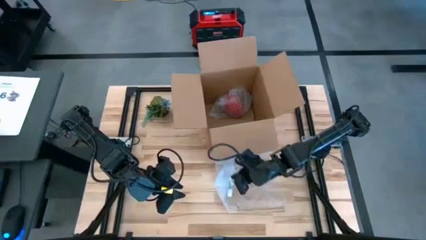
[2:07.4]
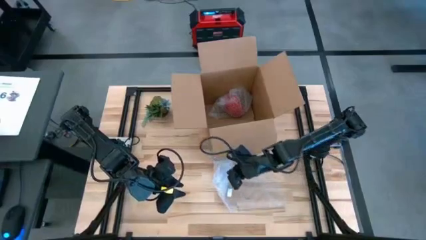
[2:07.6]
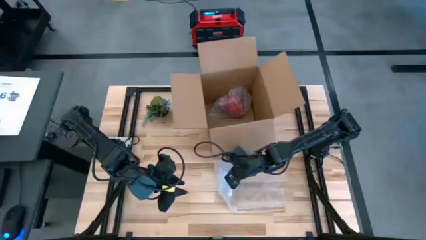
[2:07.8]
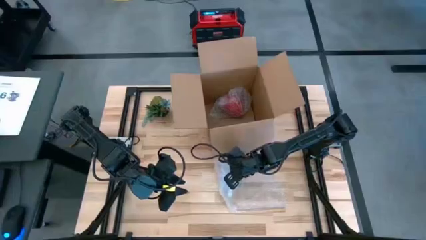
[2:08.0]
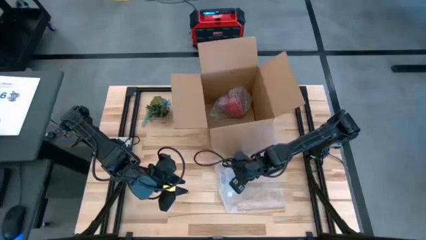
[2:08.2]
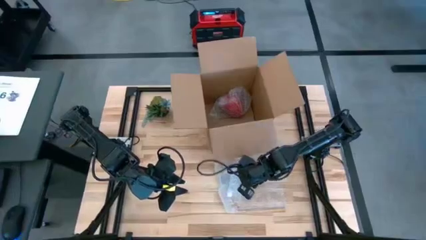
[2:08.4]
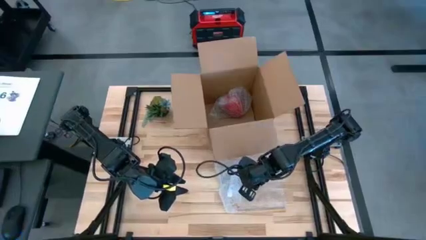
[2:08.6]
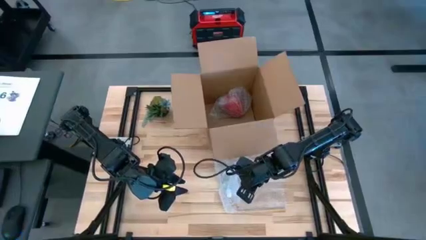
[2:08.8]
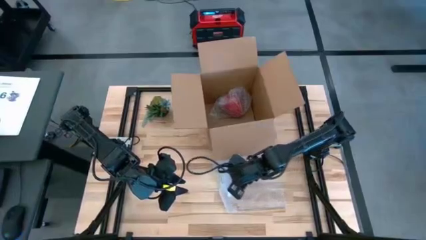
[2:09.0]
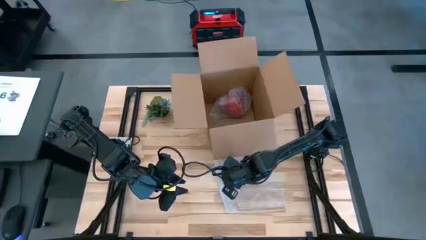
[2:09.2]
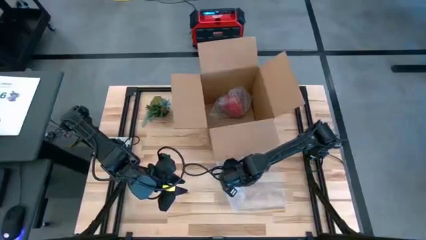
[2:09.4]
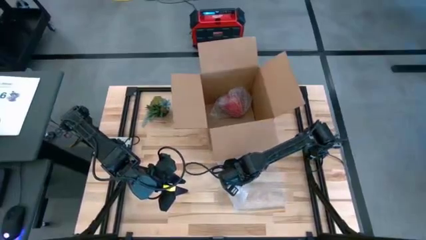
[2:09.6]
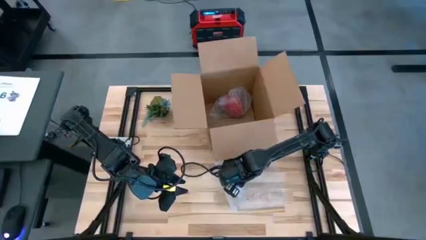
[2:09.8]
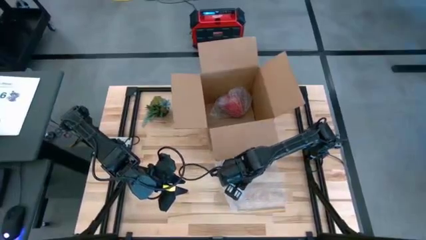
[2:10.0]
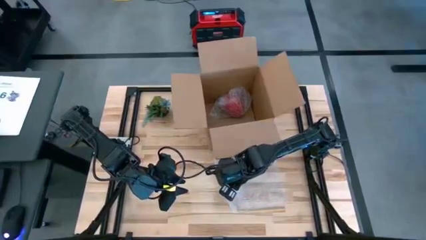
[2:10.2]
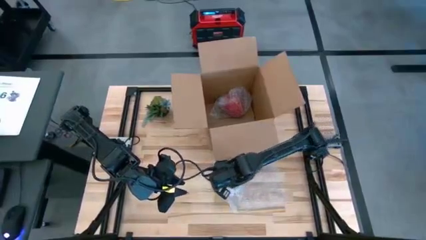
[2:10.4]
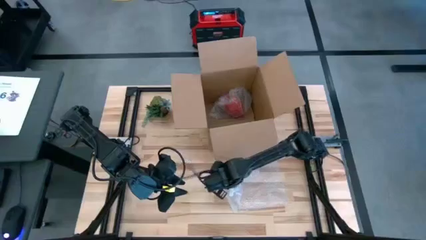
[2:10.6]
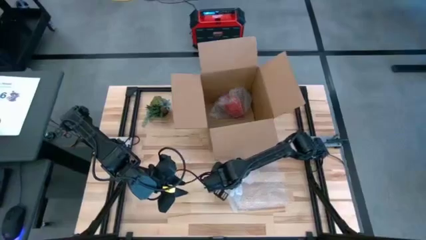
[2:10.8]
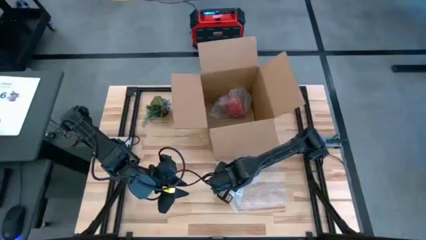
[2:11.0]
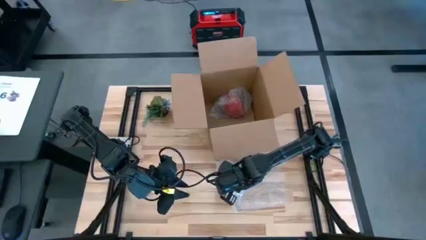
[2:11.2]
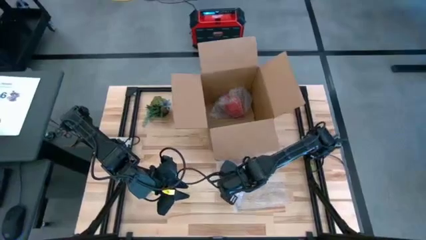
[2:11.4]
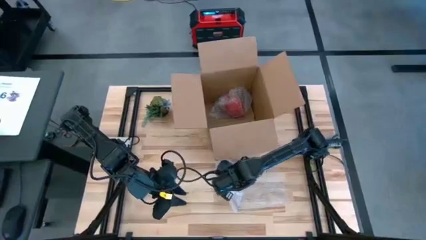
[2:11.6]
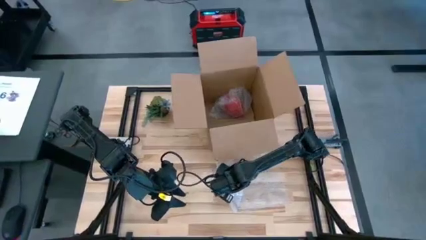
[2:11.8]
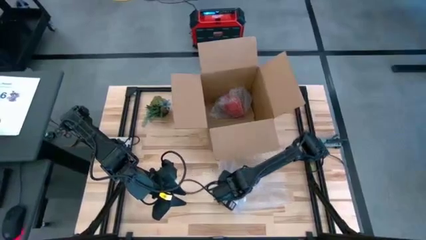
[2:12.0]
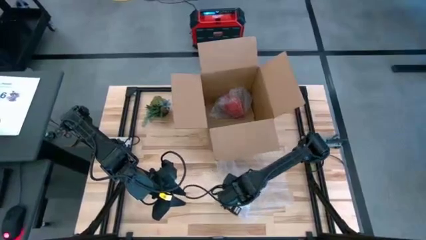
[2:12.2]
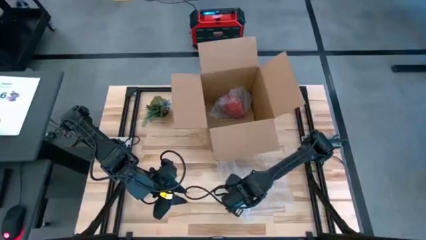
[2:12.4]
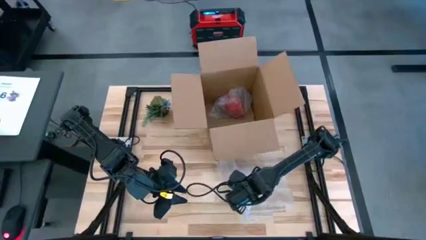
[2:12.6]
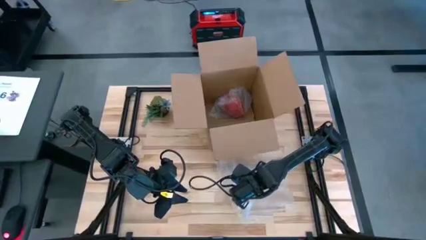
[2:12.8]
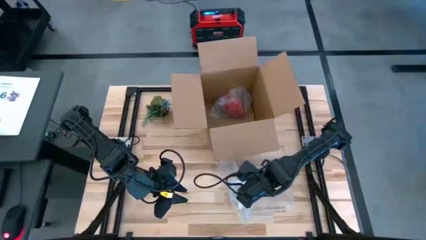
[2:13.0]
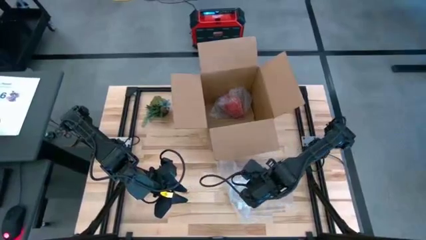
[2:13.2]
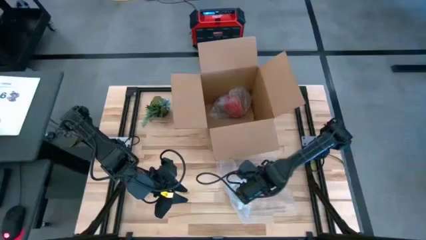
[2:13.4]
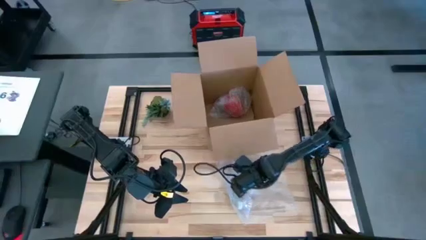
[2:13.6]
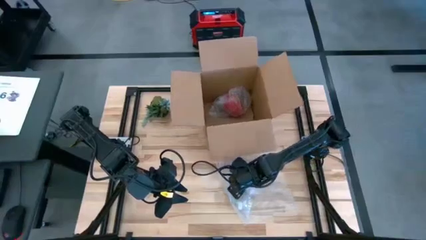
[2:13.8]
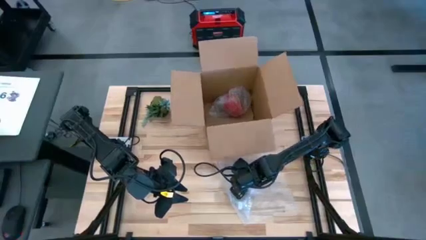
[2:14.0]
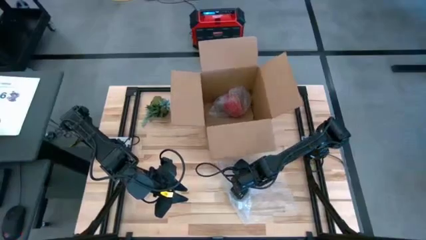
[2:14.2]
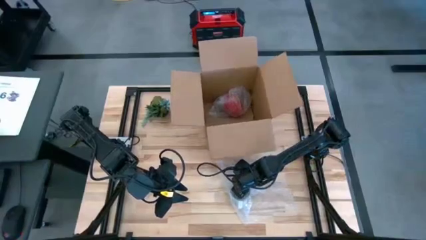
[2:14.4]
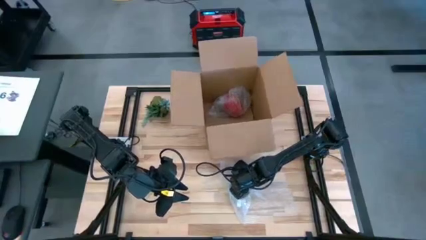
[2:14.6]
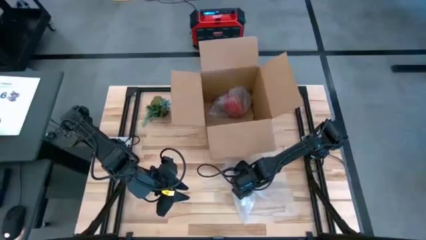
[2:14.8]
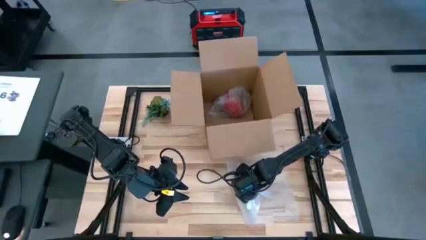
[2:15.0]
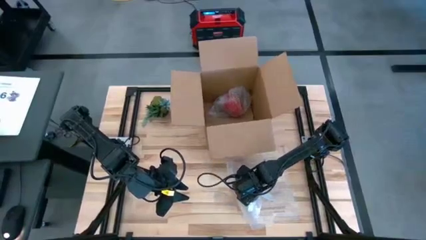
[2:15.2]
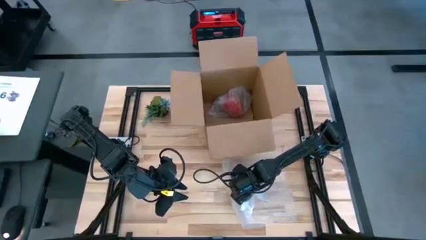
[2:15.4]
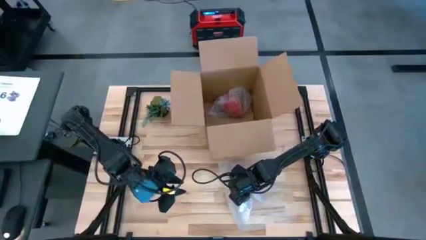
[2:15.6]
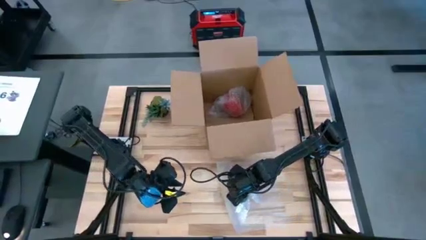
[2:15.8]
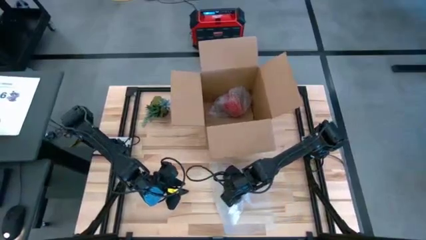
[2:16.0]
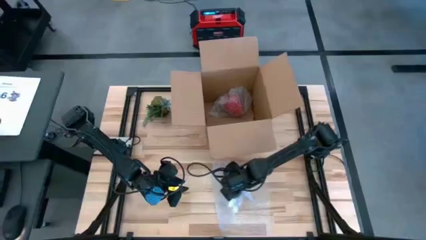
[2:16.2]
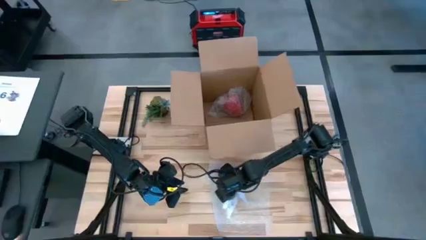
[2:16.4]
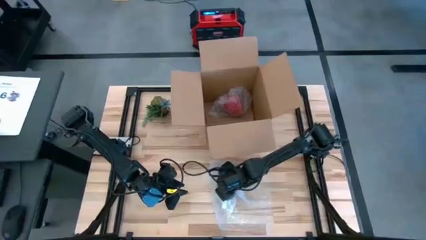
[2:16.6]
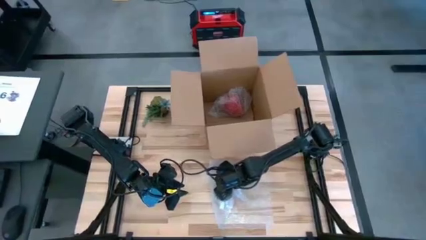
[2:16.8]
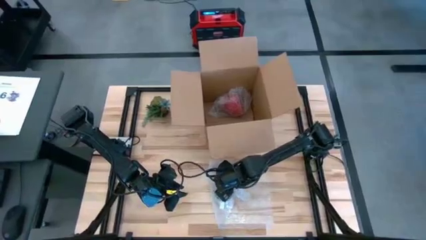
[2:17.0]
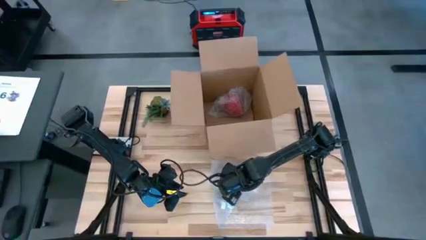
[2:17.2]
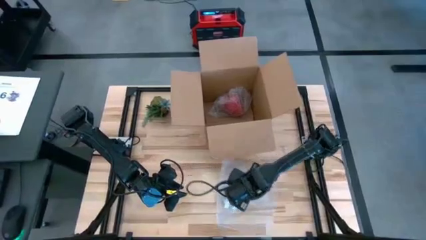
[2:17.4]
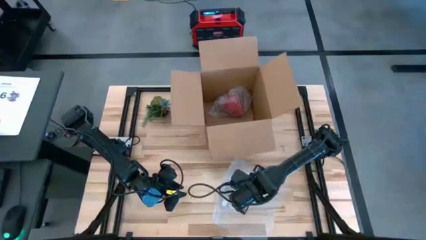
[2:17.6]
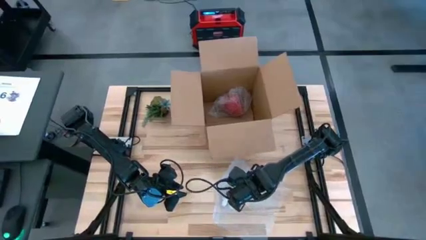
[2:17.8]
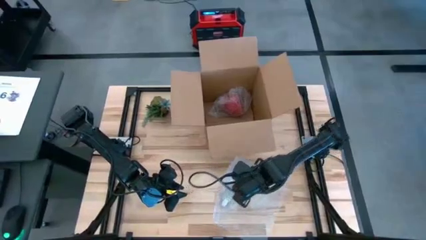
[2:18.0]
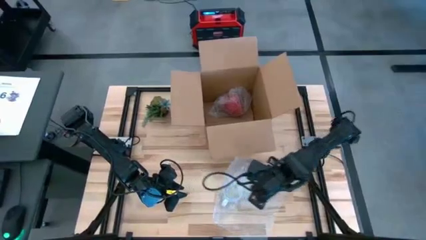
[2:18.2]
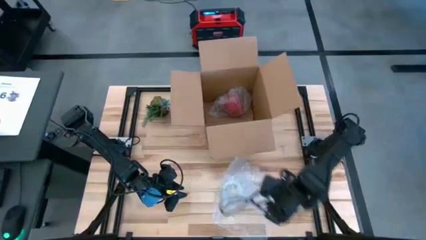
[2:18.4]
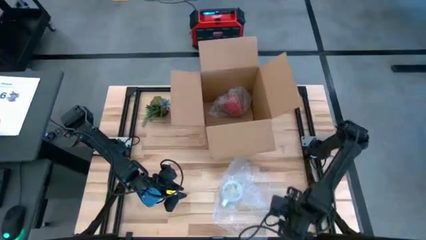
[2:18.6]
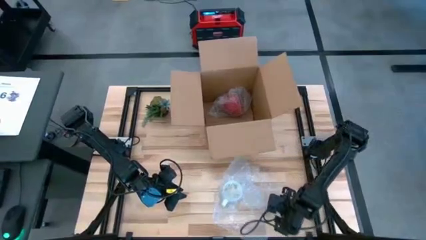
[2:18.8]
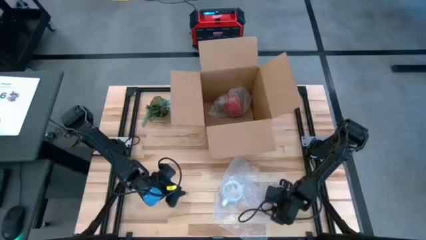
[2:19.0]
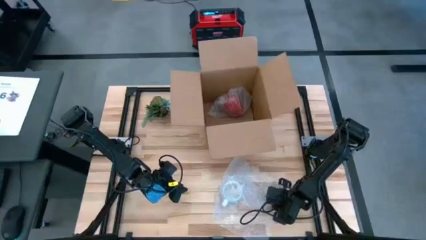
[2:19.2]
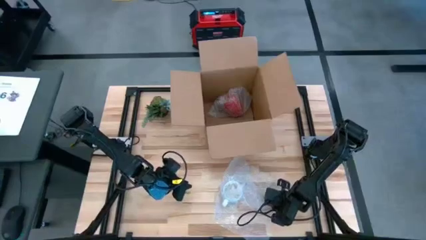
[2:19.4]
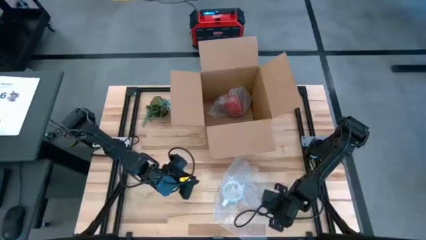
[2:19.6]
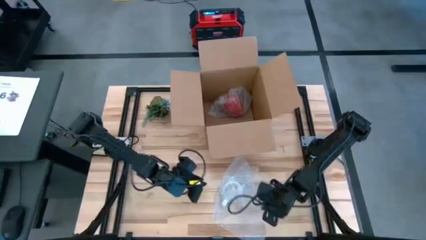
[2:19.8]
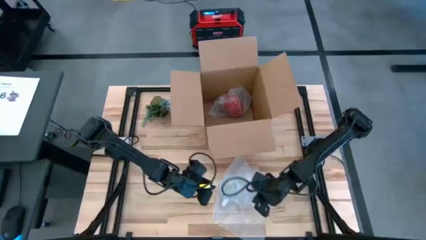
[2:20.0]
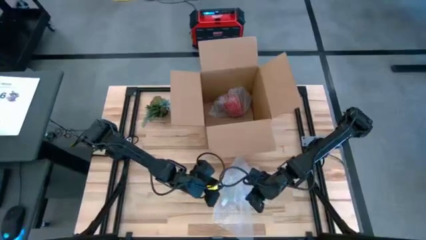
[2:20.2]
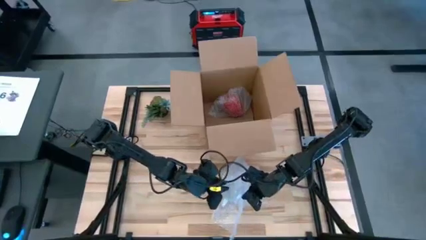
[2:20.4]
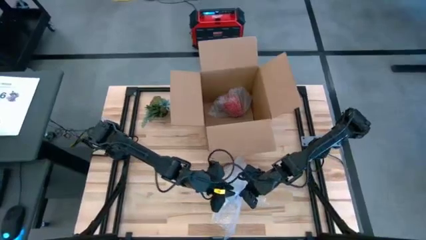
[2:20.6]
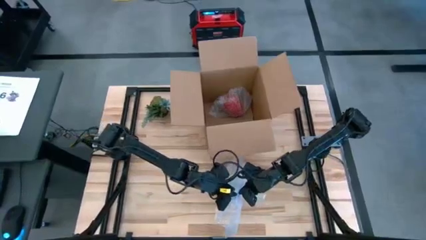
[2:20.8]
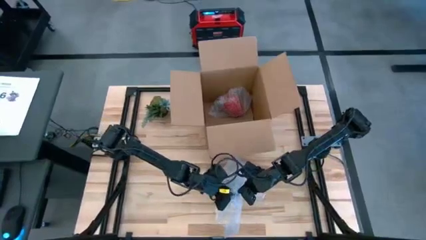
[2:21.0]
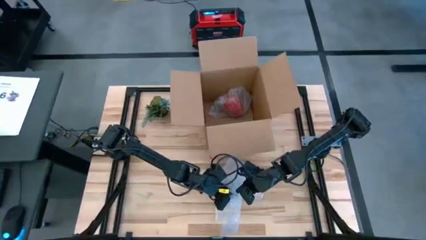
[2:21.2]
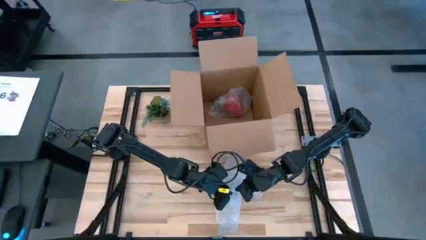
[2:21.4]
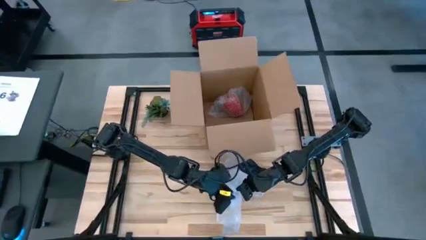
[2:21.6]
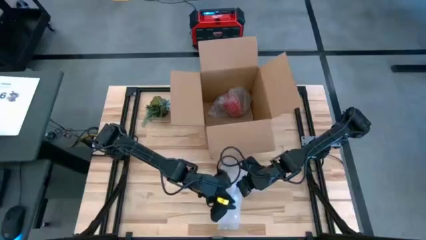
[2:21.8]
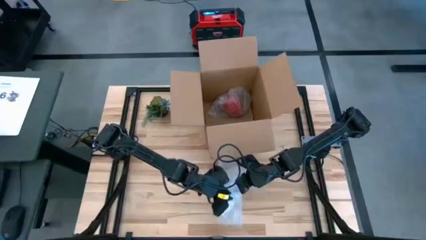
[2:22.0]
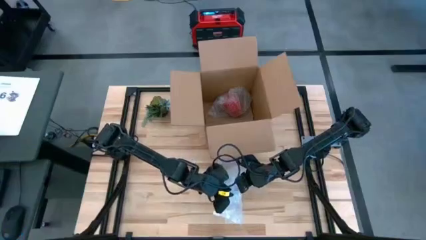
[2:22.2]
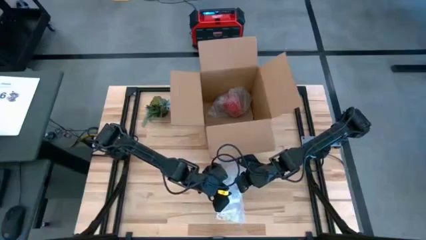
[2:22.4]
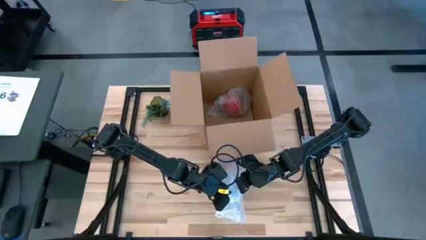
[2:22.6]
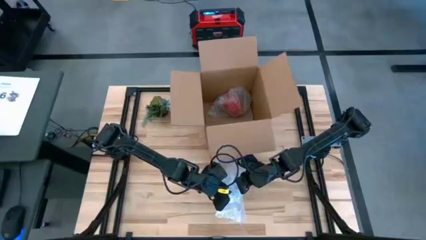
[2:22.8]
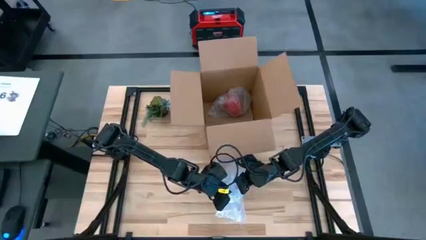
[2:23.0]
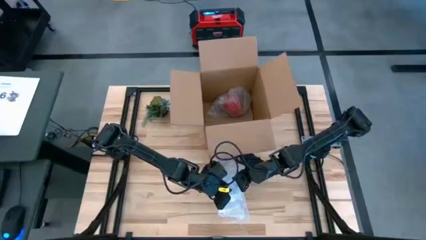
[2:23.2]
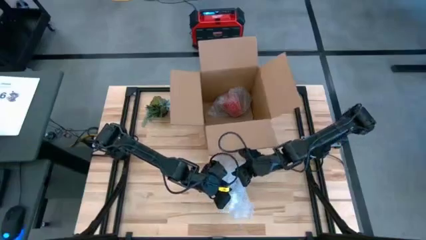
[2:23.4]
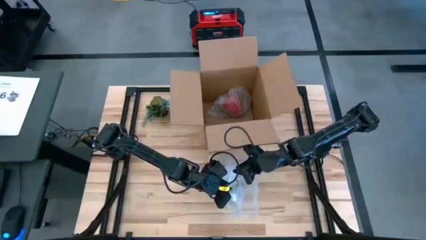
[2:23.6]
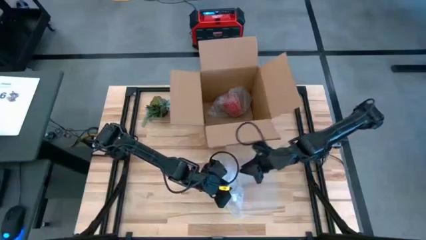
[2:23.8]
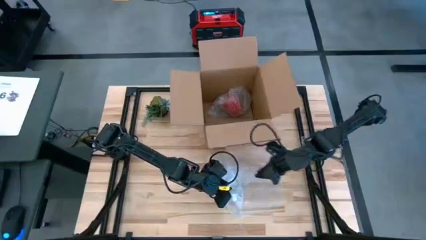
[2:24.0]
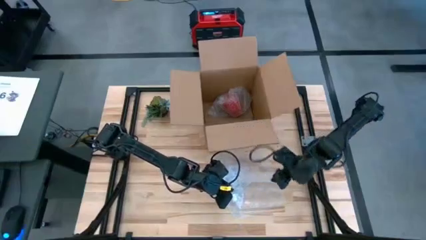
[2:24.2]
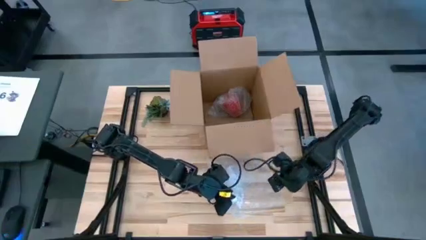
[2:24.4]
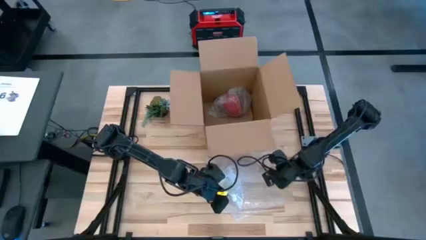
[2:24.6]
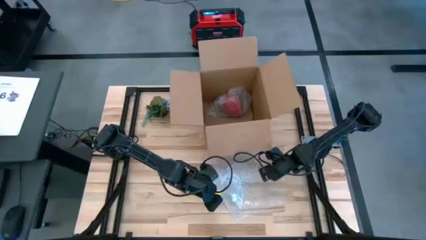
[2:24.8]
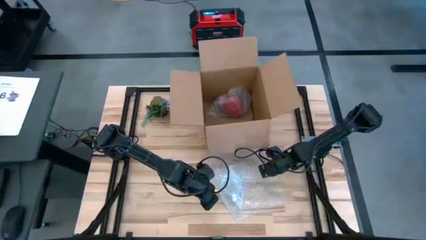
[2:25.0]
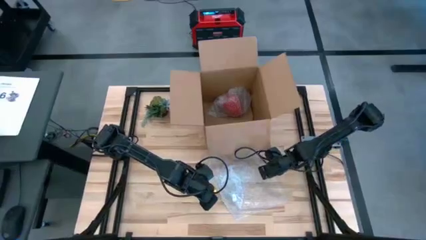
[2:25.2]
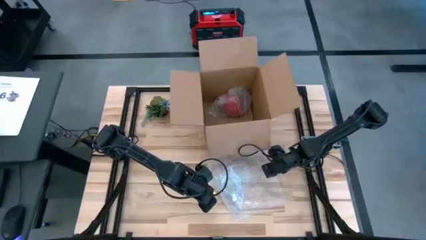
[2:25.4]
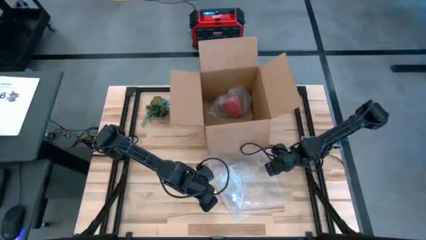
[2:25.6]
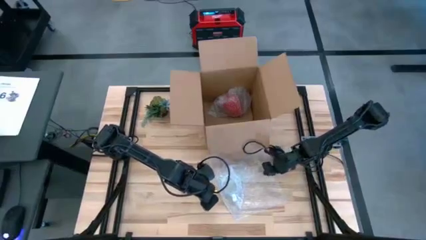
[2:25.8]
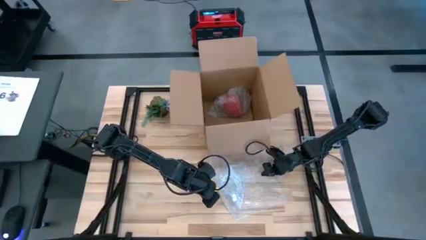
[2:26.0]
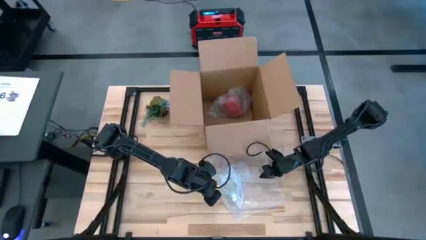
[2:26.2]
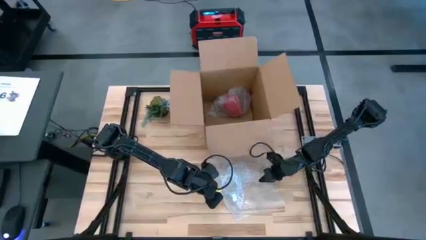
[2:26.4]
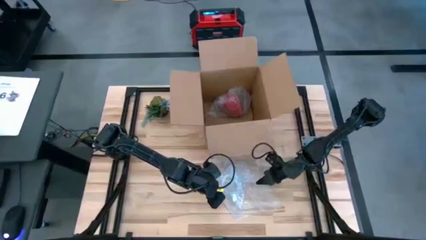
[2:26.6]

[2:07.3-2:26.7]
Task: wrap mug
Wrap the white mug with bubble wrap
